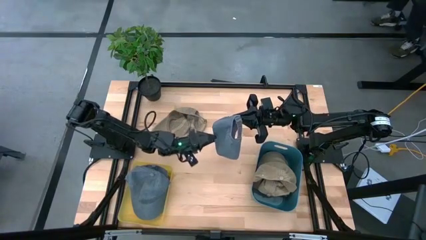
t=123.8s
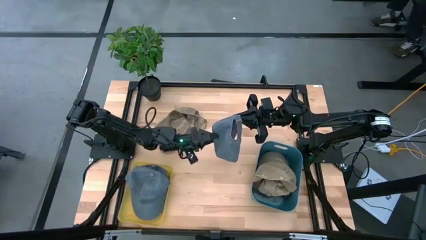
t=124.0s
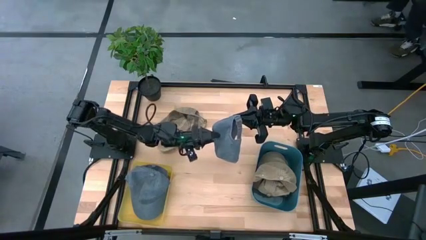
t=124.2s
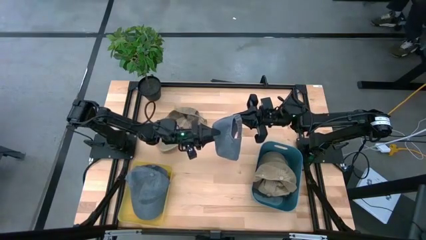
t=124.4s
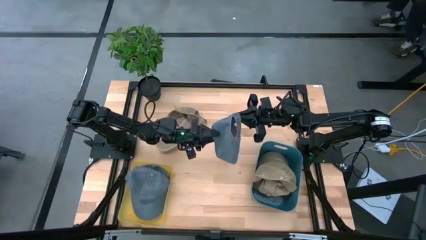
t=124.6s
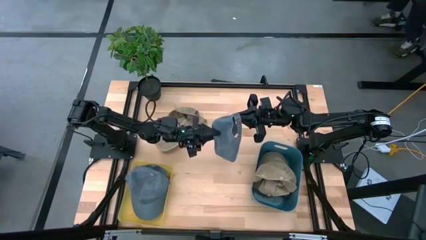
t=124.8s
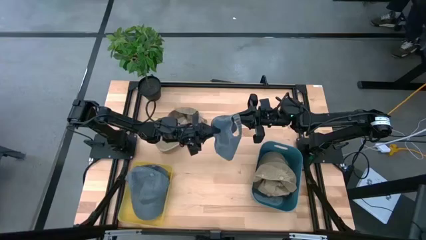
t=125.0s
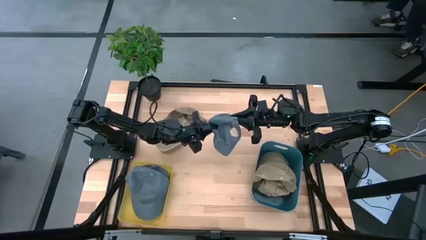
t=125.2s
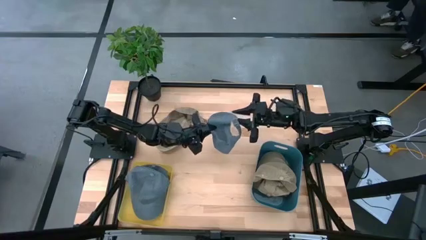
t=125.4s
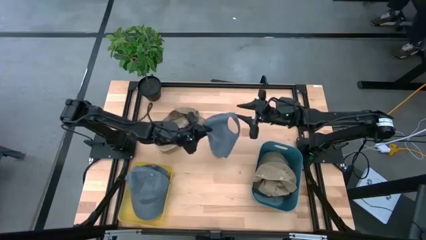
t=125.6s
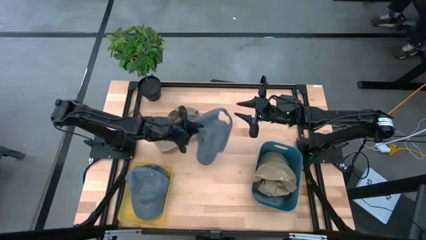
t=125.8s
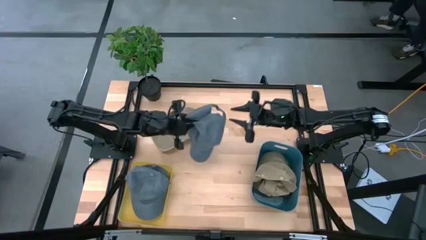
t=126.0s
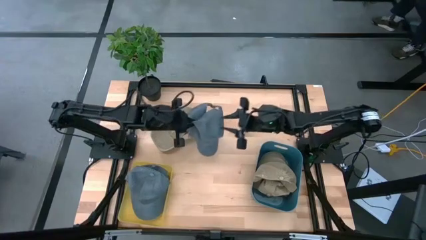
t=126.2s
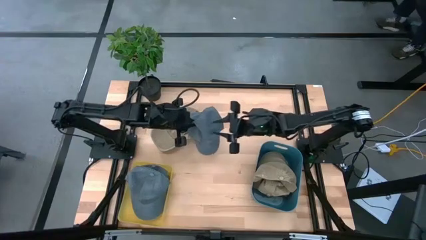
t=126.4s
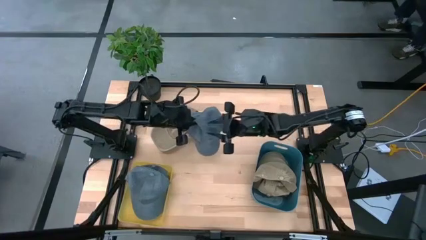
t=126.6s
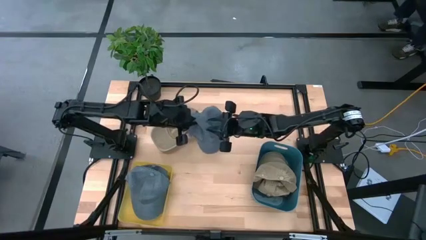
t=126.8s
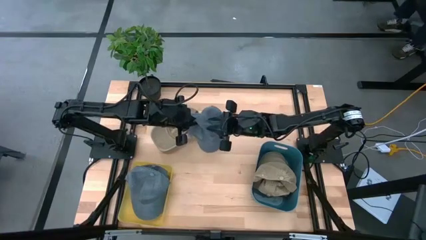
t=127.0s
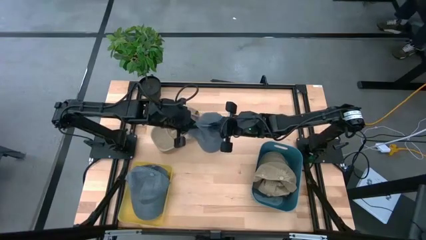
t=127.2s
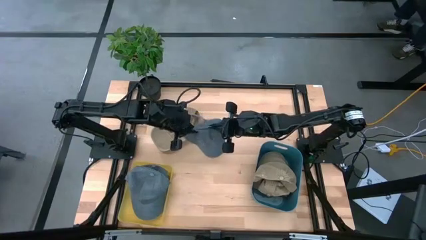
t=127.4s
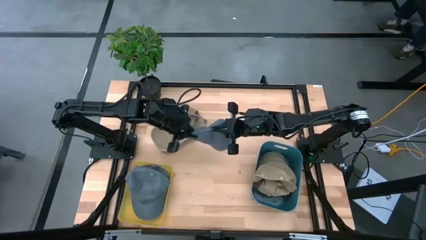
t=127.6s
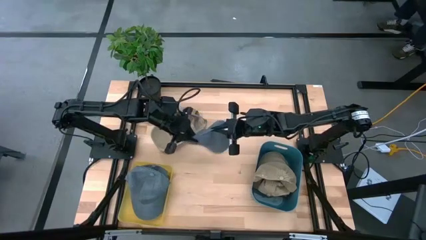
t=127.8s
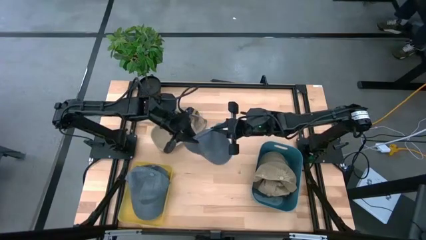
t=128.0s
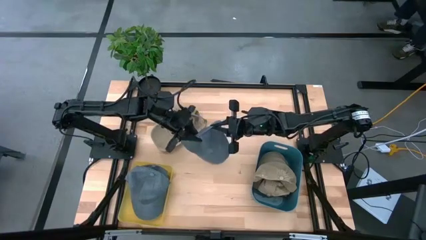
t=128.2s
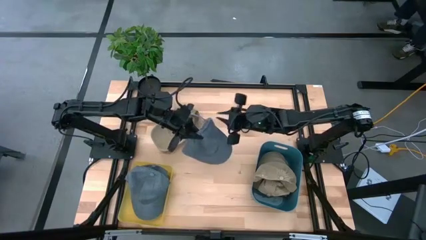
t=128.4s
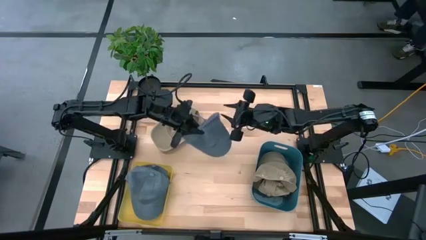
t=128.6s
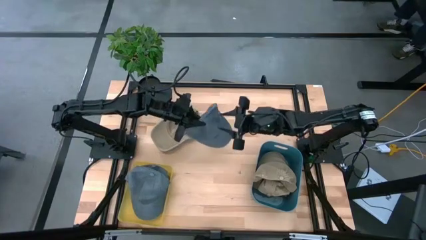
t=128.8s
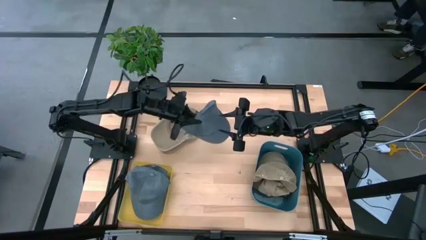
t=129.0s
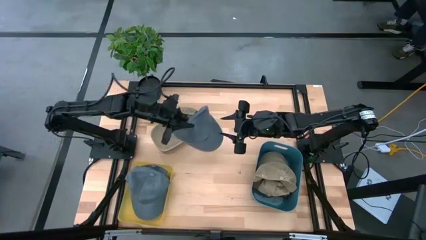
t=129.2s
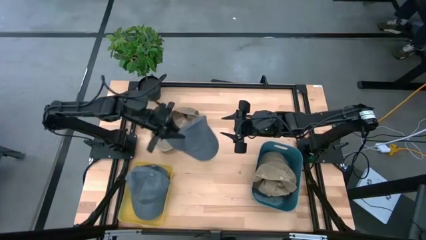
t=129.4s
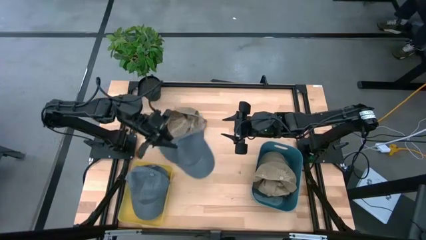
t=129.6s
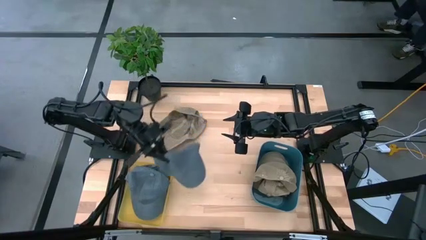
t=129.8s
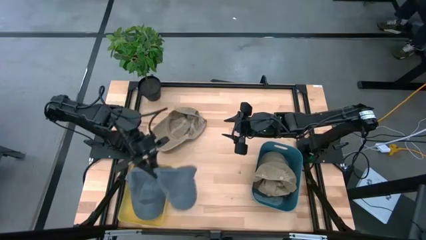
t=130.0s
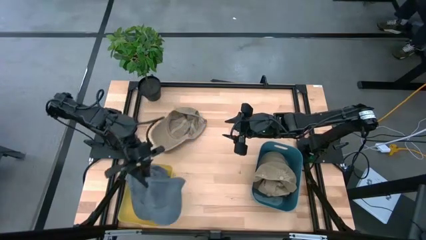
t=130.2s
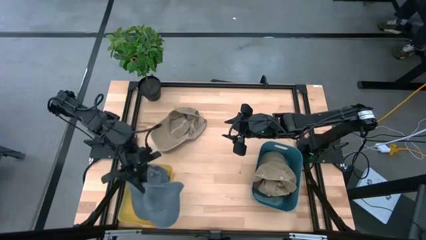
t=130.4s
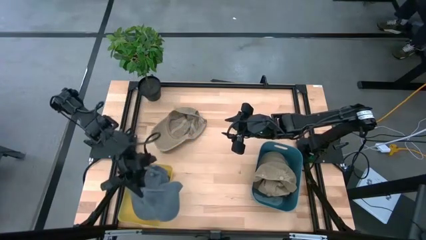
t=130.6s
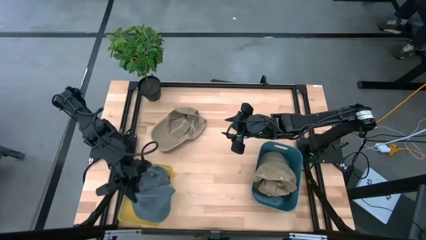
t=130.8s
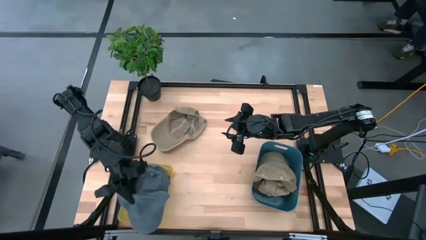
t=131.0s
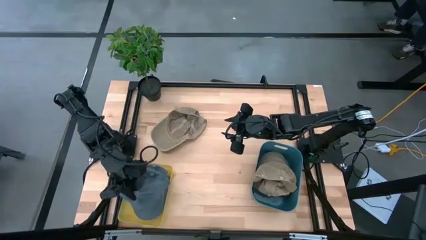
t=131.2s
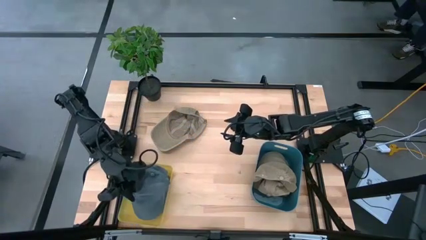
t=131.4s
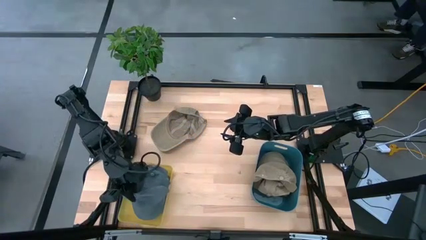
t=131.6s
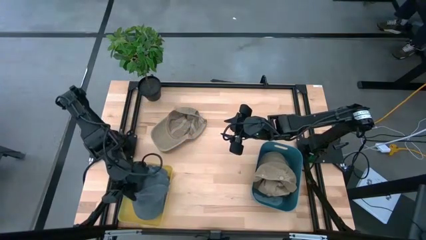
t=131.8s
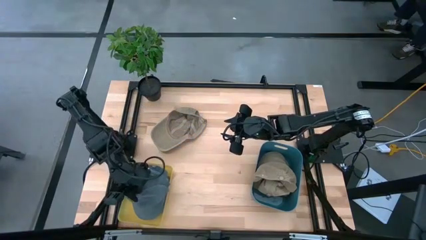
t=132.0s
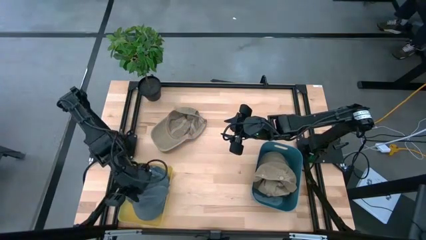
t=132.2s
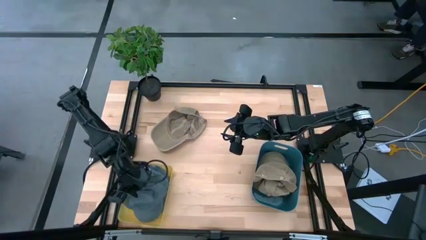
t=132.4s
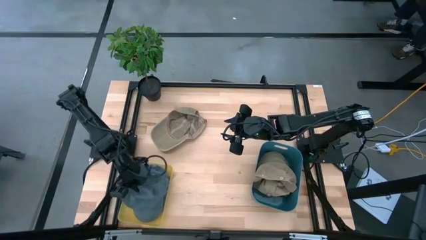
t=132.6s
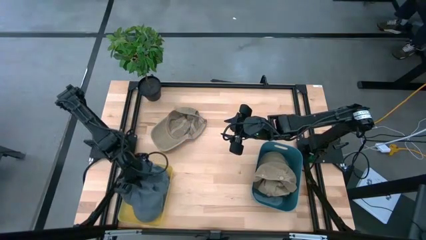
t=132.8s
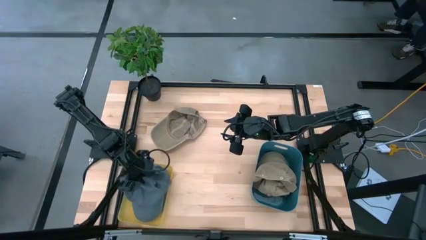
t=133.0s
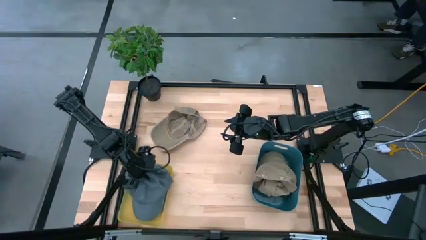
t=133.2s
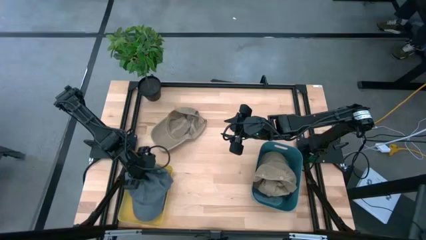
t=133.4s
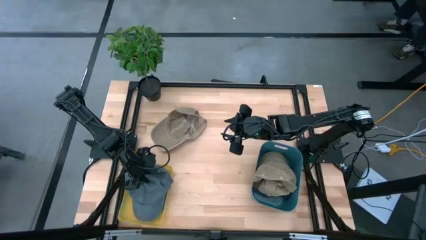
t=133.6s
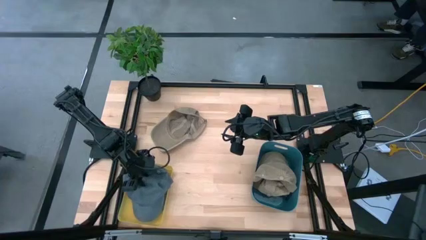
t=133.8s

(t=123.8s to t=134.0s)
Task: Pick & Place hat
Put the blue cap into the yellow bin

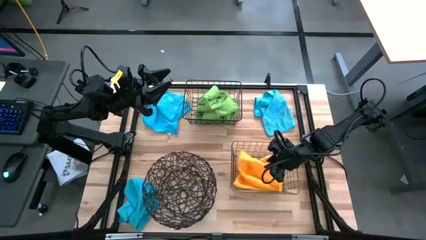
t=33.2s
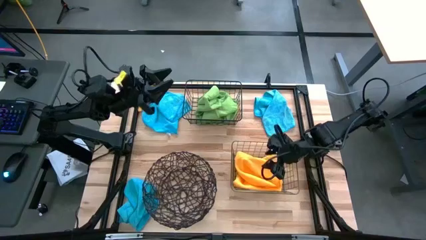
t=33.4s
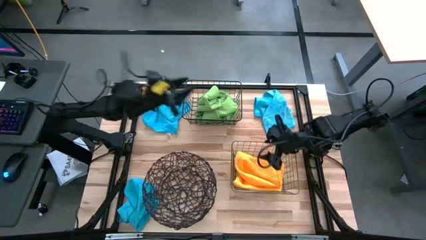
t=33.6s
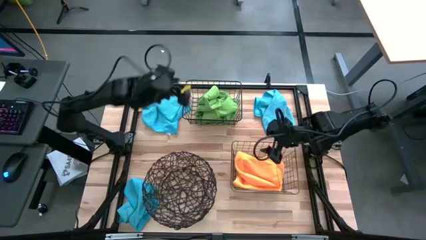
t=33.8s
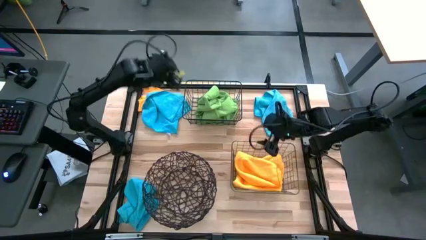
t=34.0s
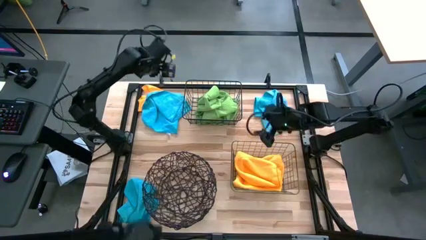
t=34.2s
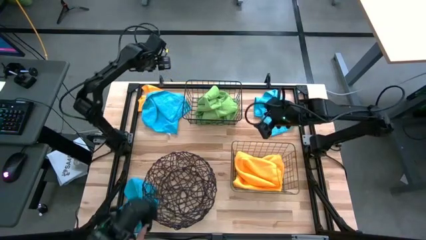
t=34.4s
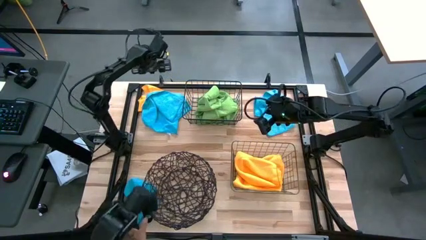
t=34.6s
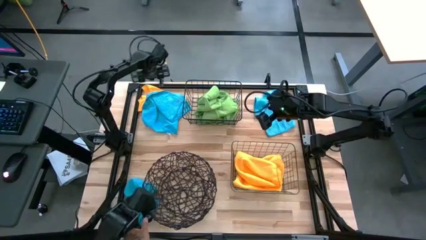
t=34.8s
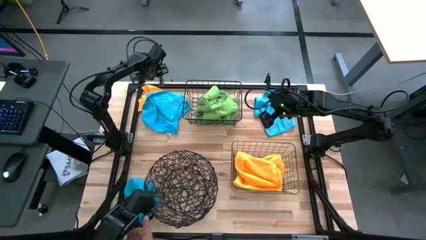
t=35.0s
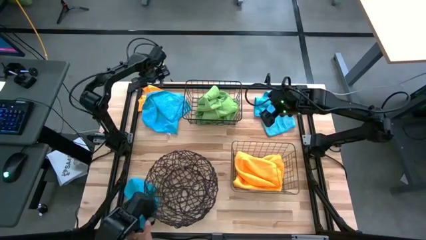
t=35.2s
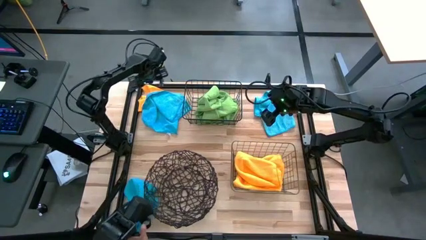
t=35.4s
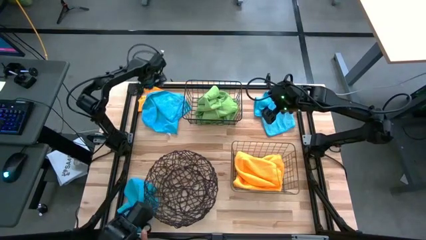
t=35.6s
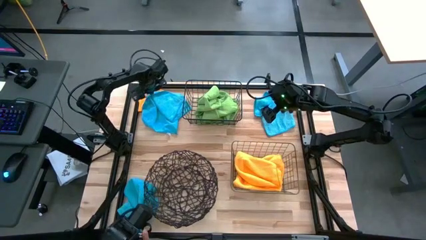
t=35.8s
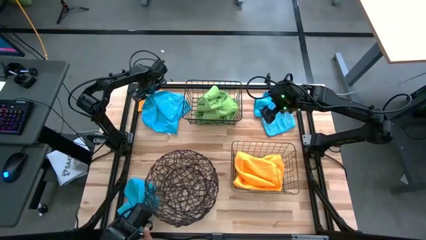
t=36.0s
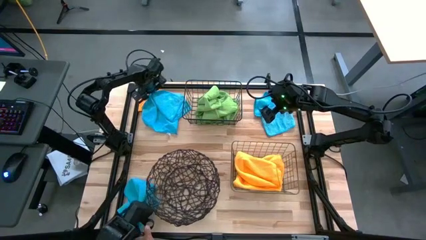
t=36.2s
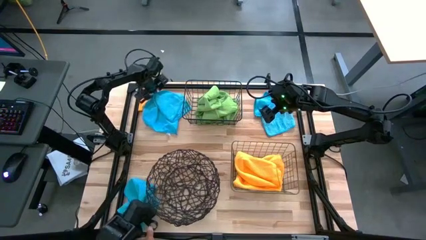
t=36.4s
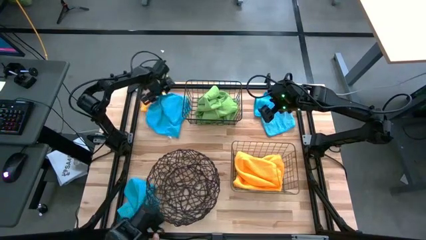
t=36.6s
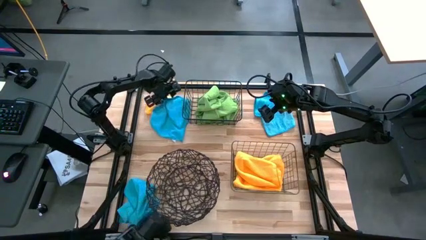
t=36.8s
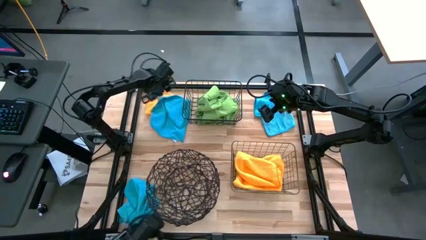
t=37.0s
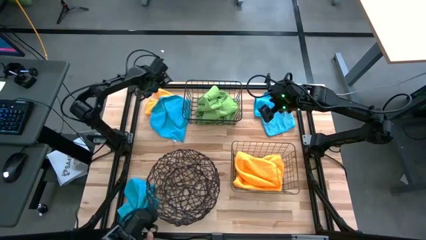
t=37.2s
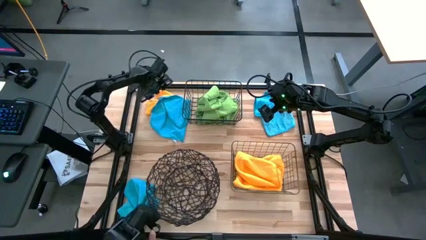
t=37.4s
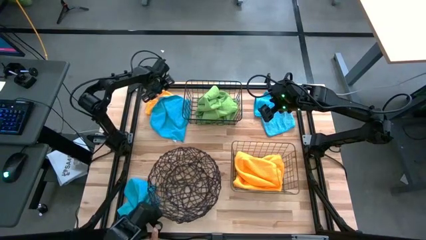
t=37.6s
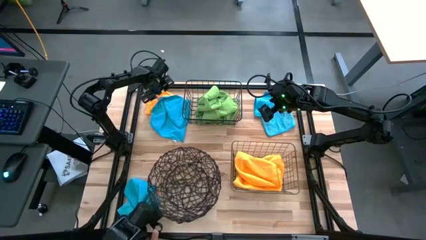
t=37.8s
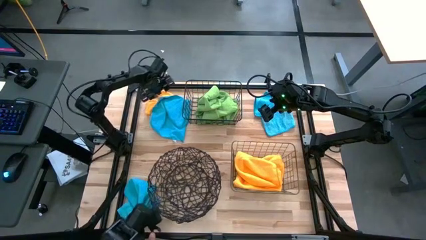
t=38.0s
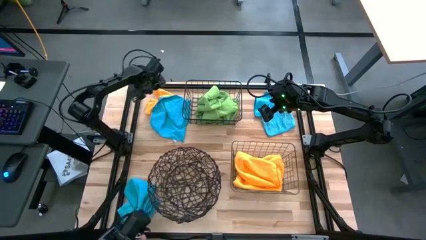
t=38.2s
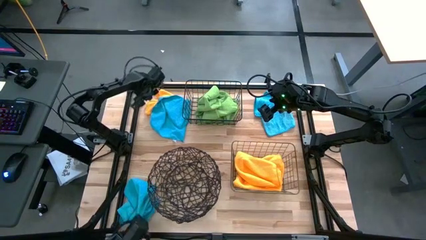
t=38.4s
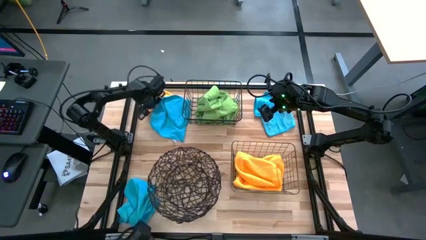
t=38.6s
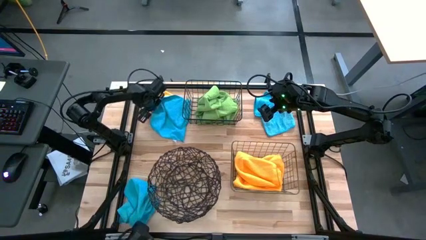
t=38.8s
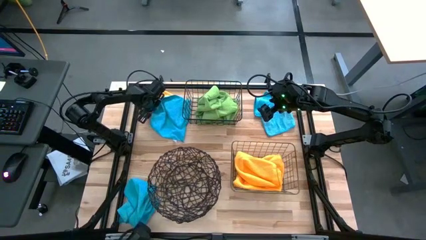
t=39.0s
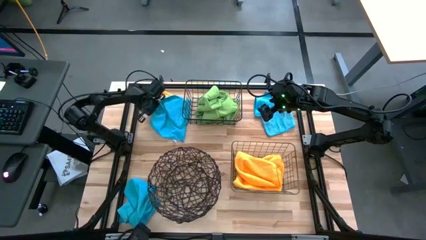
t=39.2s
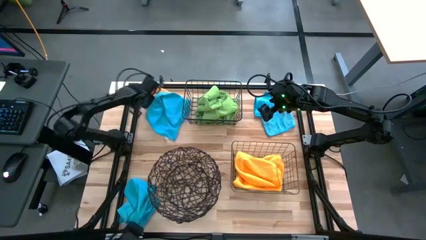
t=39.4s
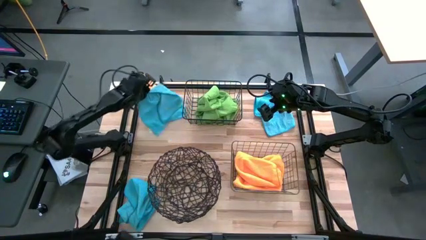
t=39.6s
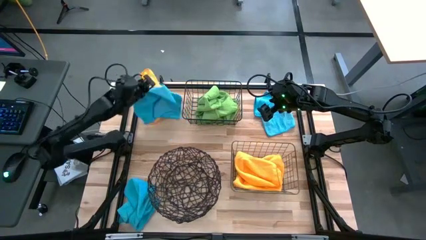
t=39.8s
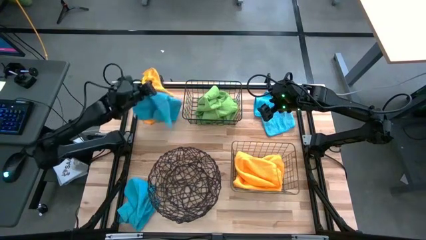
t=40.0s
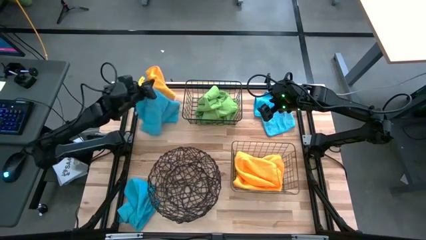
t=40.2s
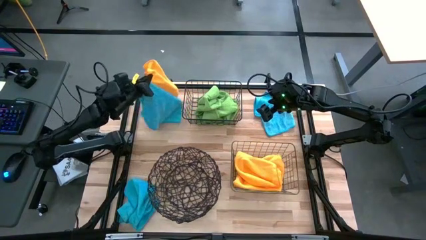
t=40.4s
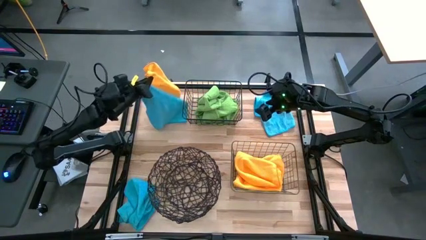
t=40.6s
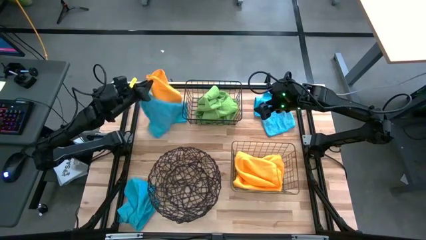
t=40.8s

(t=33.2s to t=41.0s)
Task: Sort microfiber towel by color & place in baskets
Put the orange towel into the gold wire basket
